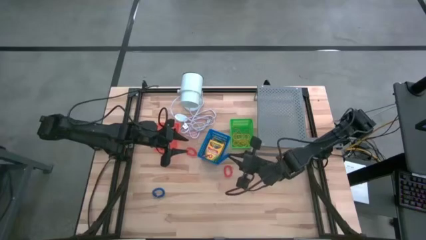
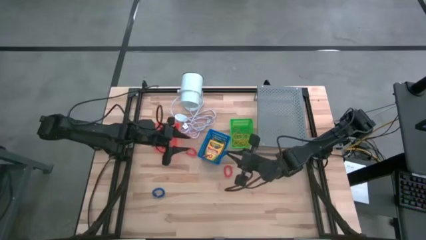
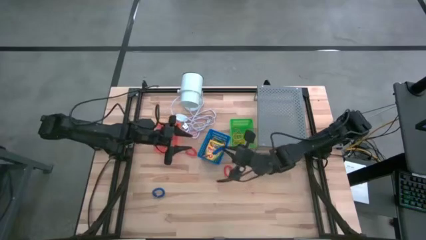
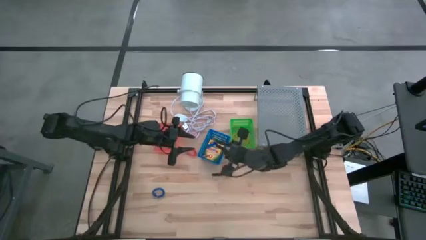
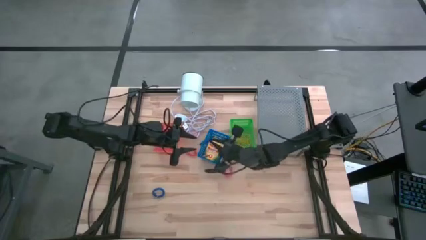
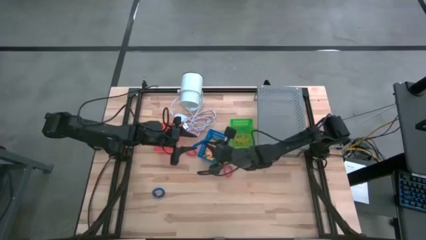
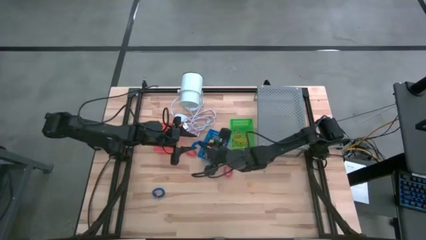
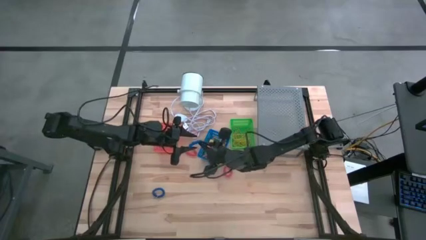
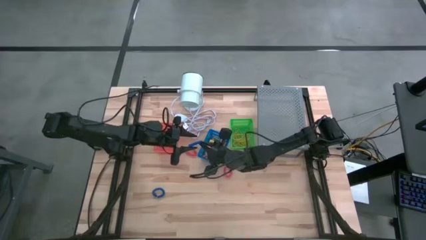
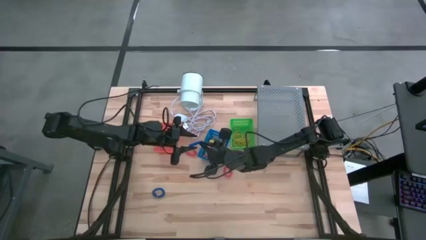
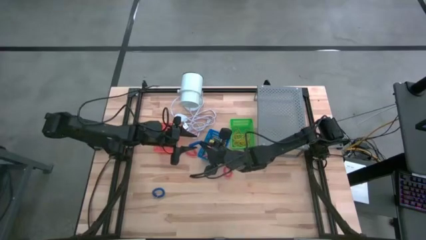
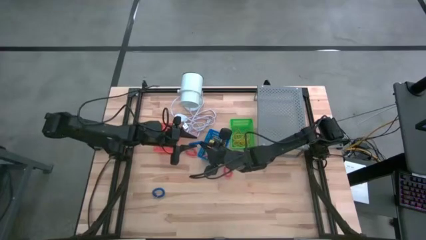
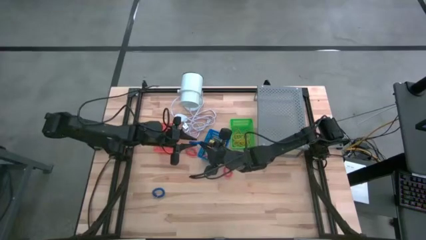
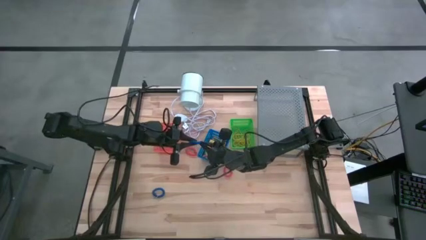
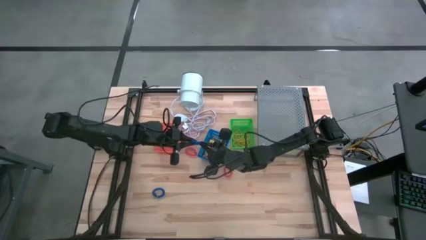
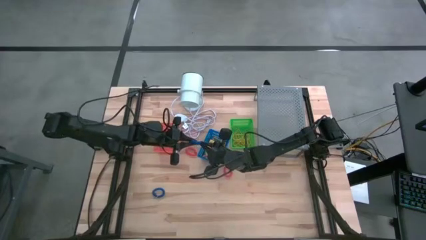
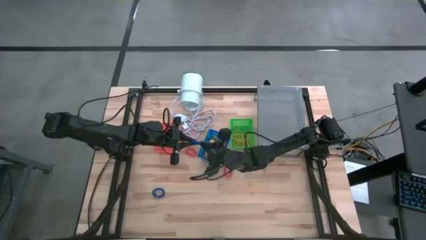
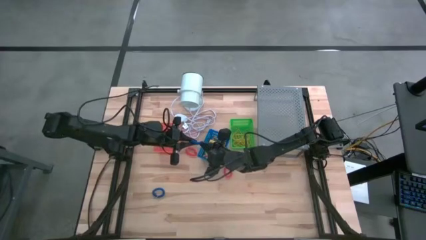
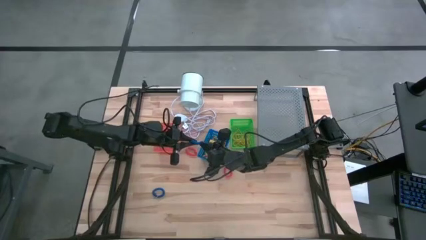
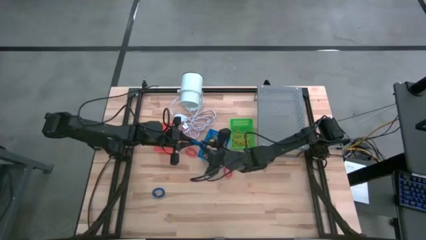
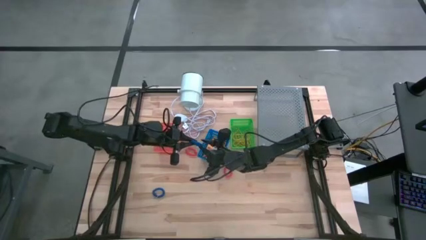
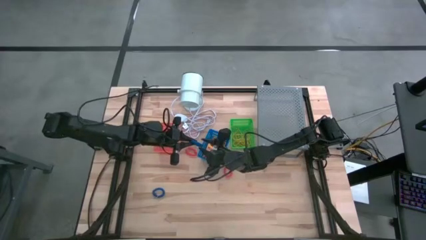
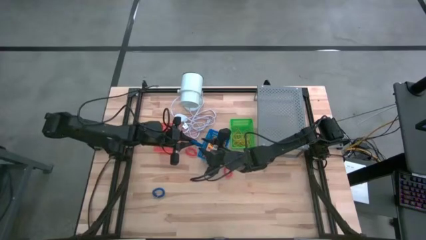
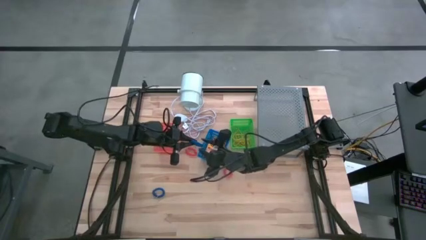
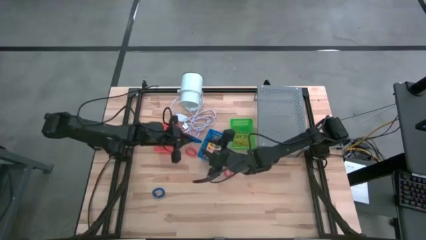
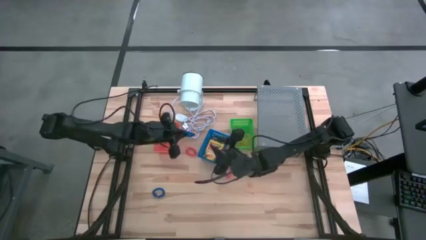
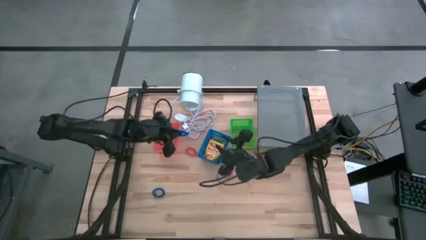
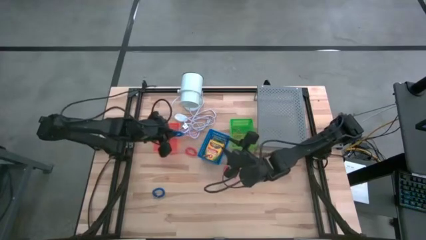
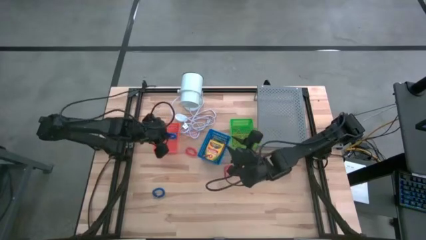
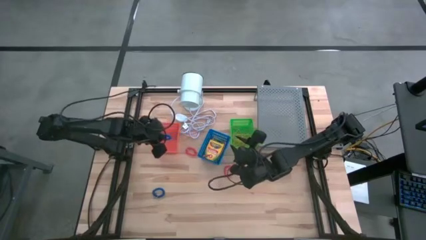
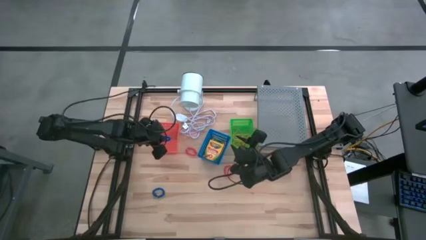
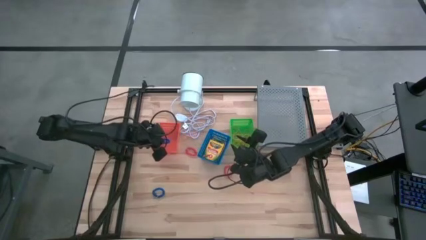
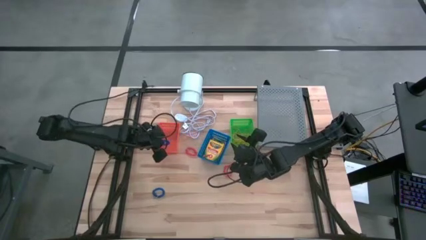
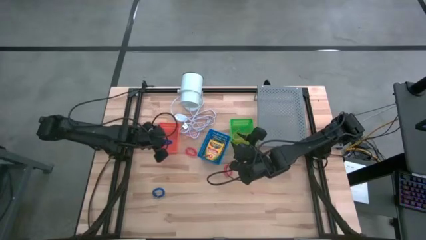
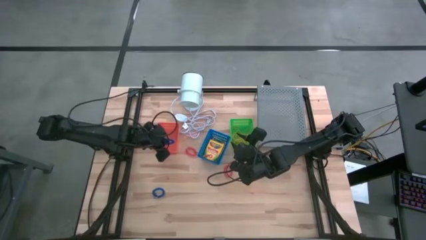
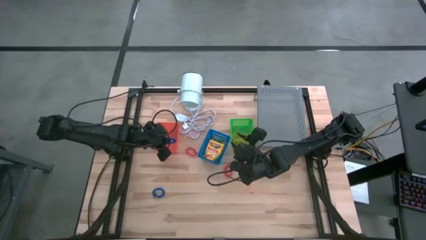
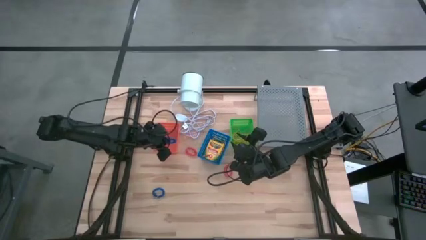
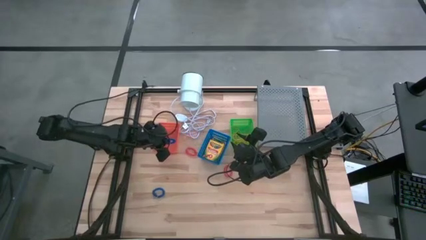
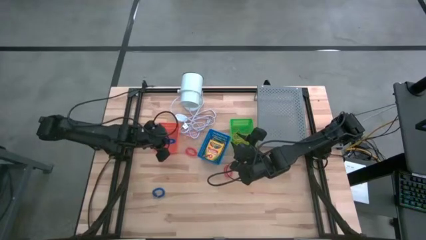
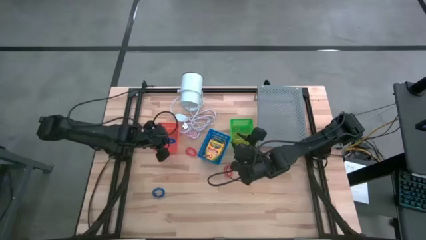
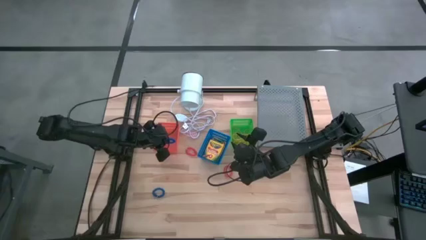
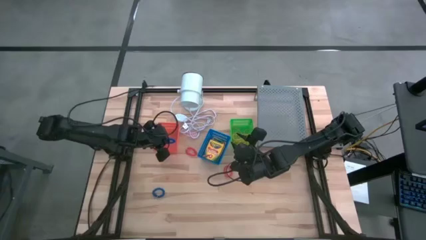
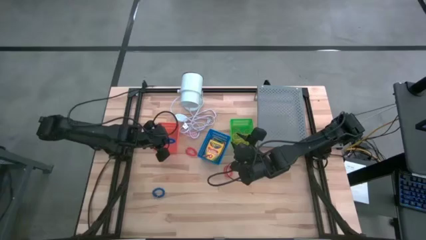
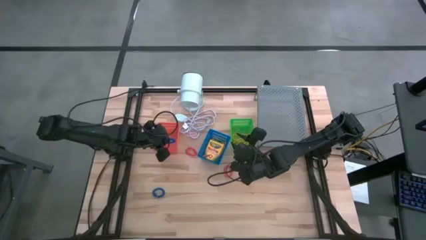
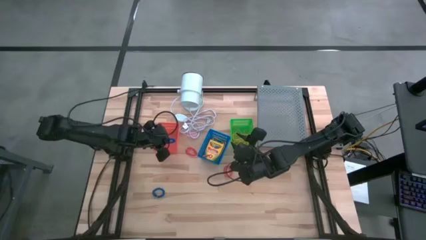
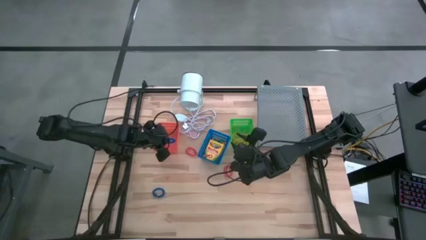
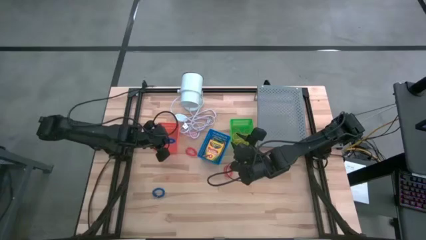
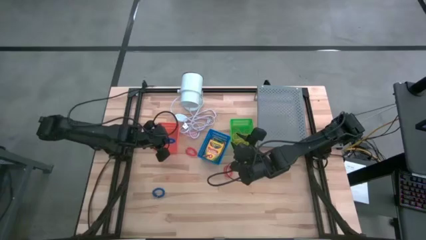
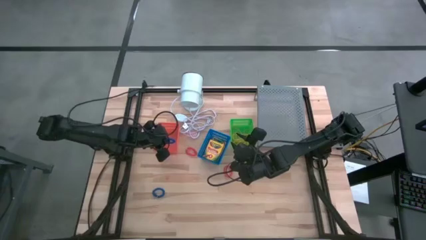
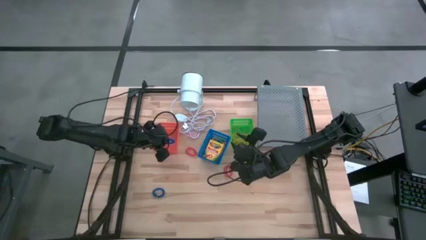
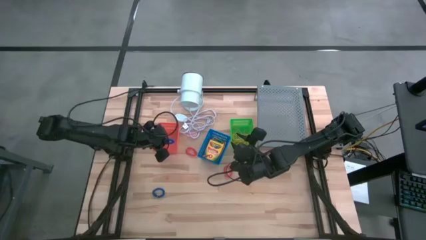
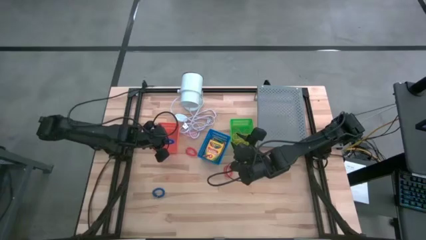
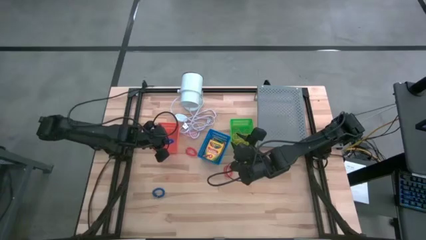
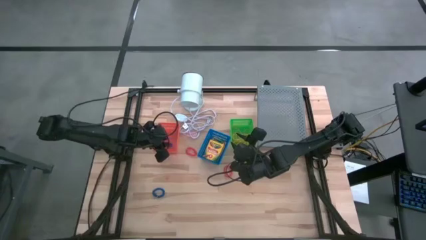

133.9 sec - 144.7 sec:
Task: Pick & Place Office Desk Supplies
Put the blue spring keychain into the orange bin
